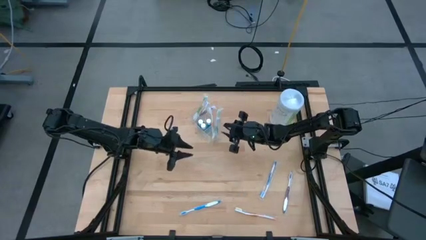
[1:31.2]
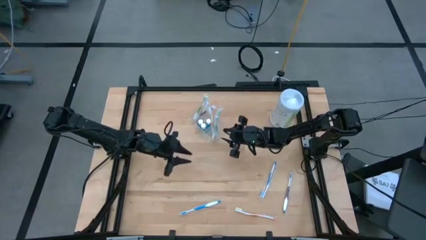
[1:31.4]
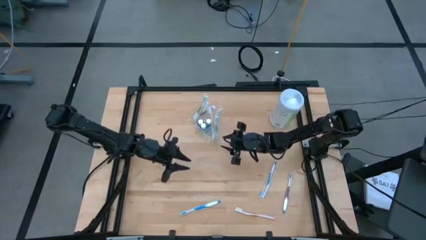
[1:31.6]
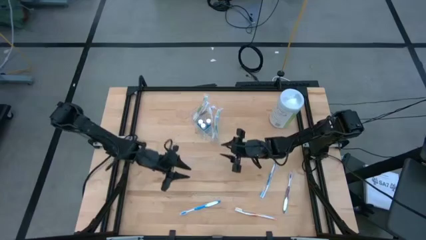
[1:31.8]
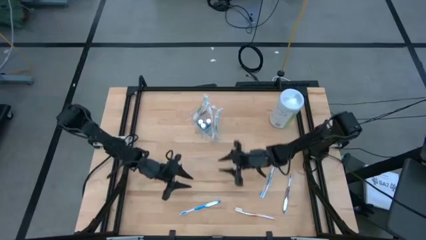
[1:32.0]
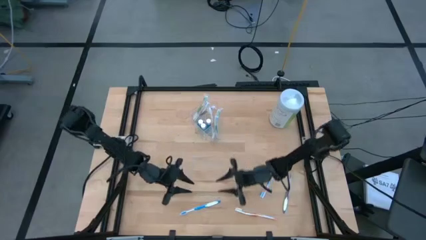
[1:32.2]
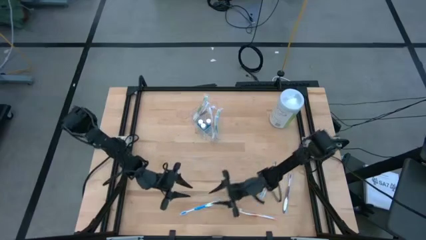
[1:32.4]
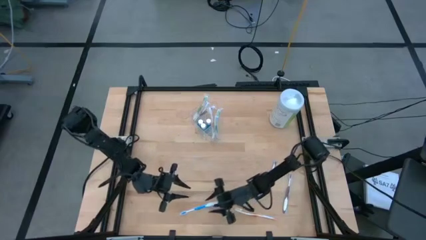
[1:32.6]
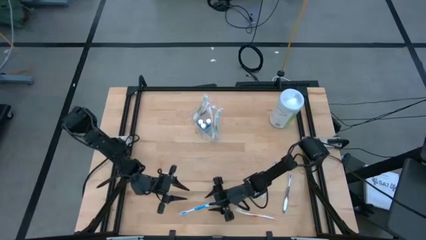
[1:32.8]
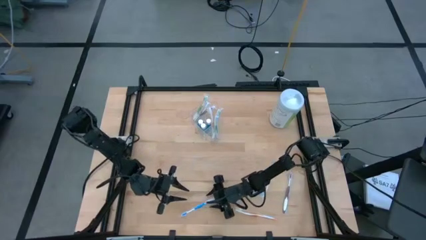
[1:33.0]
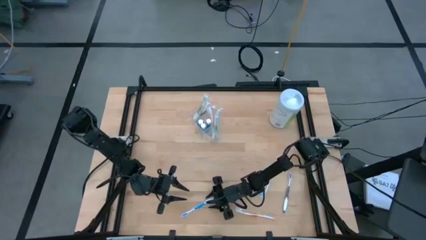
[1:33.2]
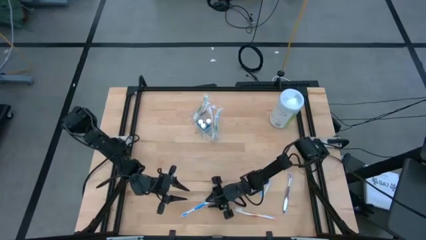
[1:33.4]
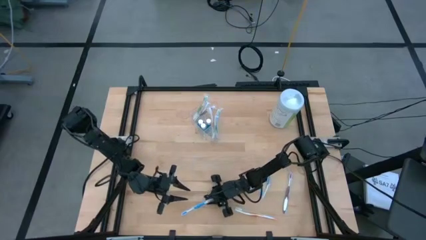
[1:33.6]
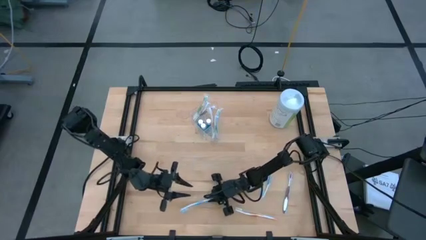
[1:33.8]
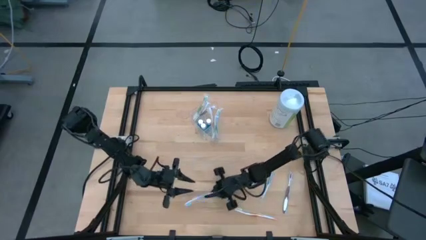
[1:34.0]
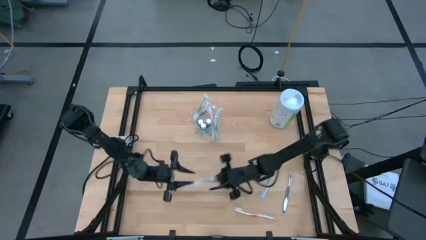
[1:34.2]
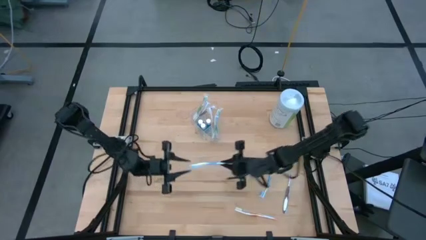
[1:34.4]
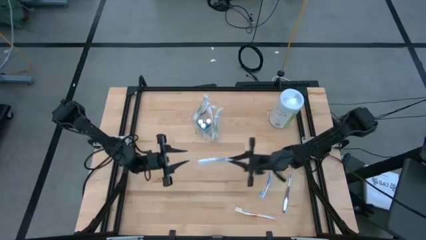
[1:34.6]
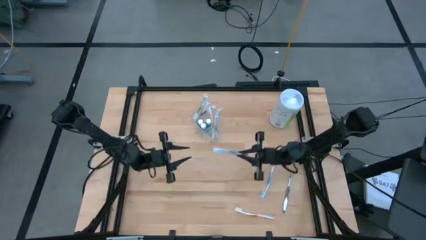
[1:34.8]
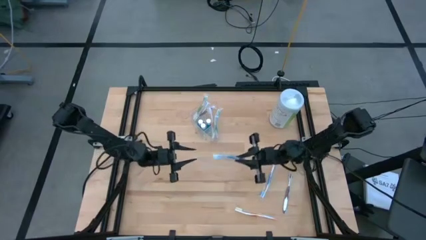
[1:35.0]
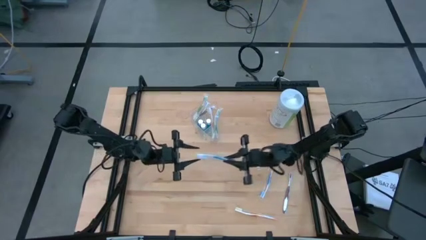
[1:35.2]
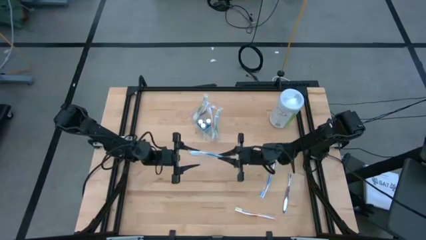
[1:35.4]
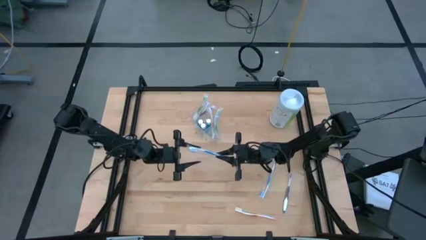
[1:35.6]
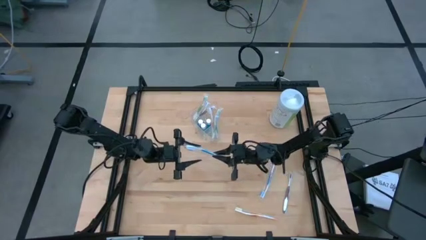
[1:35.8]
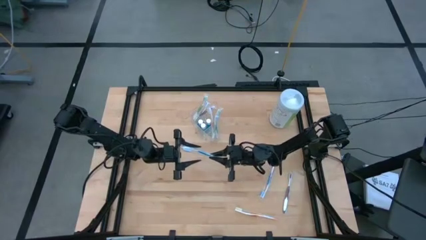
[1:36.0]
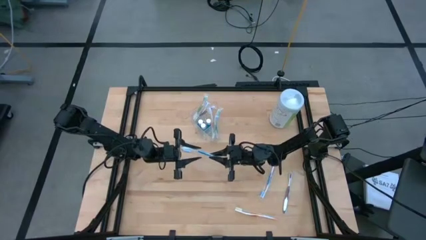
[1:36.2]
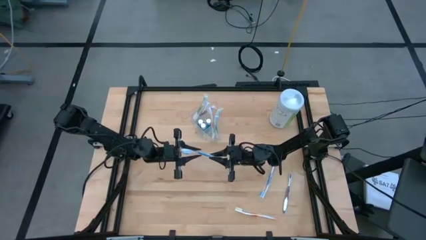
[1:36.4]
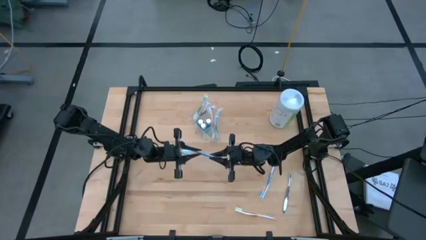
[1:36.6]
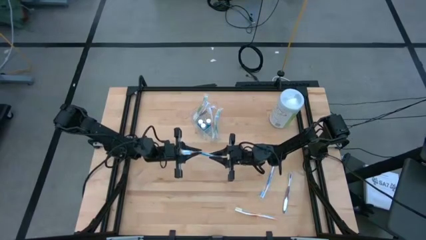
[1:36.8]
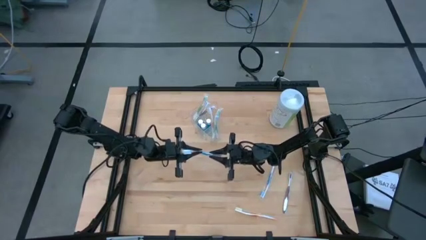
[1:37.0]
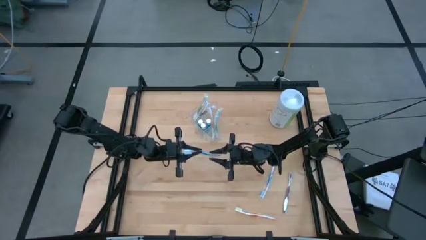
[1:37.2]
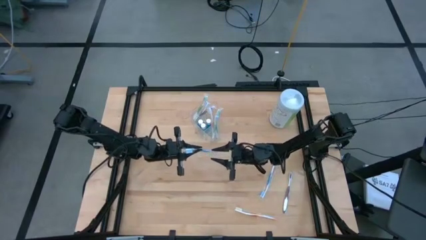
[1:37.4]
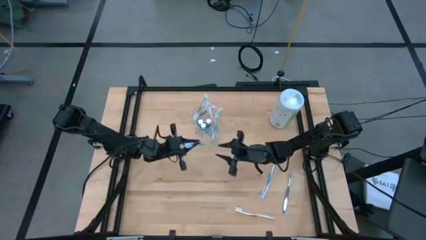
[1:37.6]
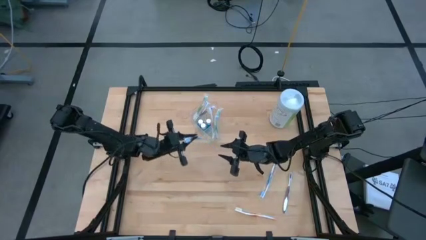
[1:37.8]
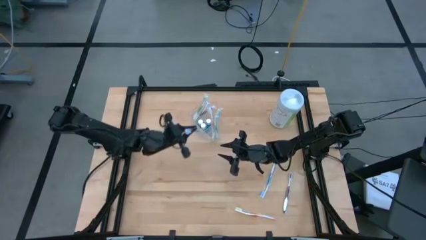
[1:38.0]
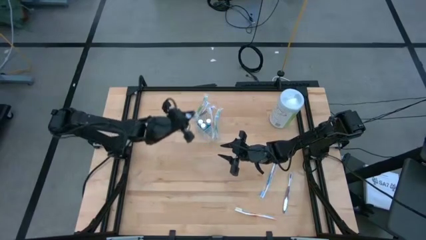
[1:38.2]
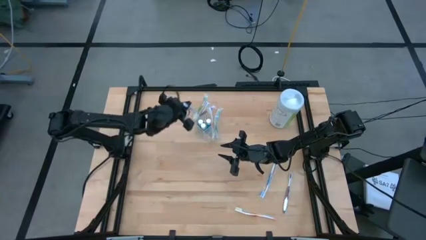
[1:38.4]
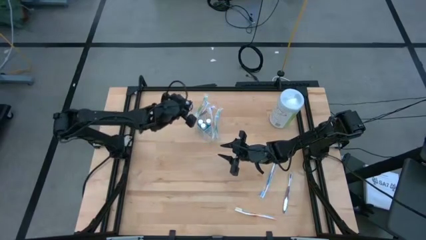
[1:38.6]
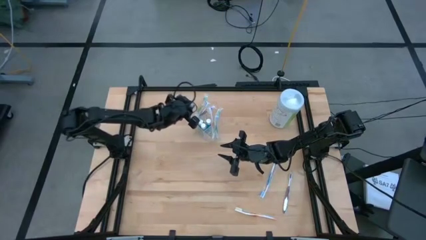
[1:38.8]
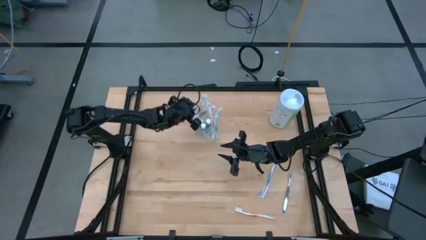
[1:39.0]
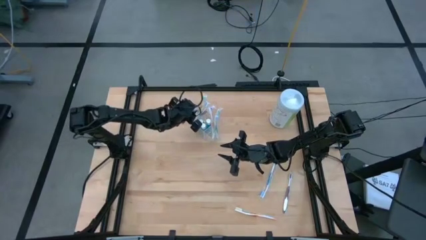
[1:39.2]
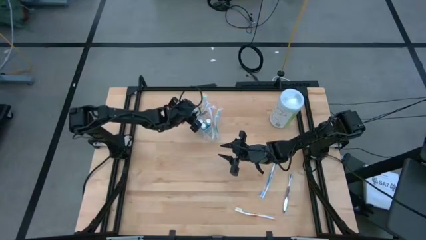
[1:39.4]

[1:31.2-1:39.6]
Task: Pick & Place toothbrushing station
Put the left blue toothbrush into the left section of the organizer

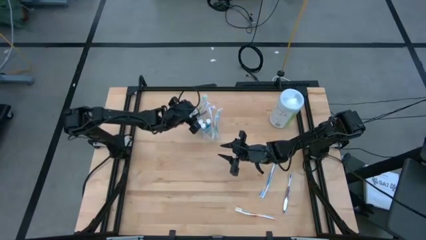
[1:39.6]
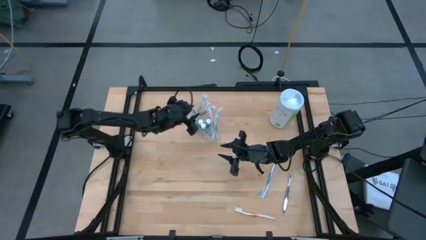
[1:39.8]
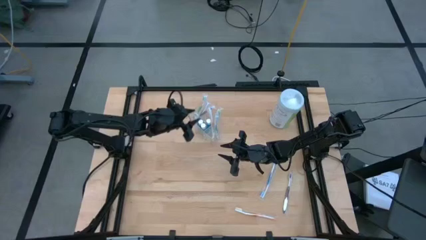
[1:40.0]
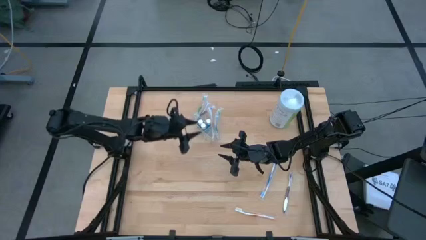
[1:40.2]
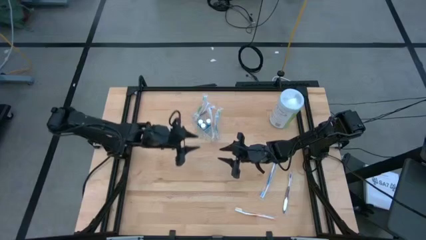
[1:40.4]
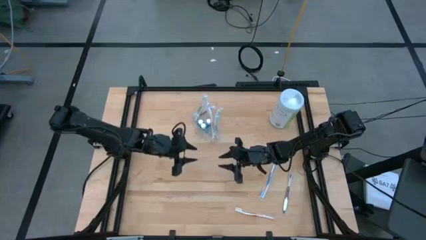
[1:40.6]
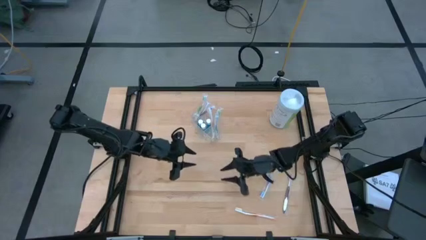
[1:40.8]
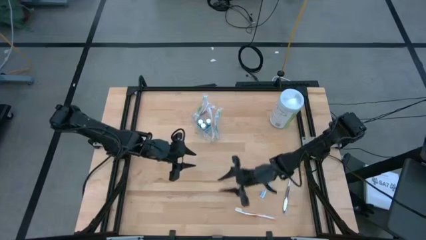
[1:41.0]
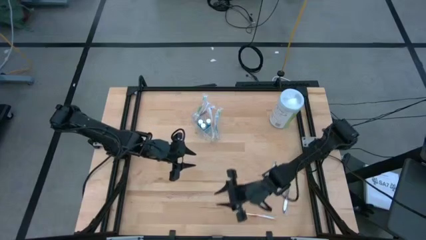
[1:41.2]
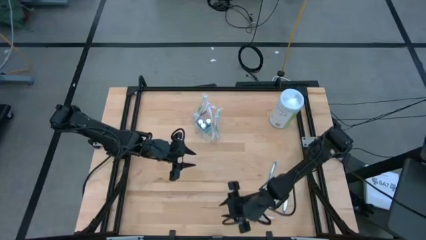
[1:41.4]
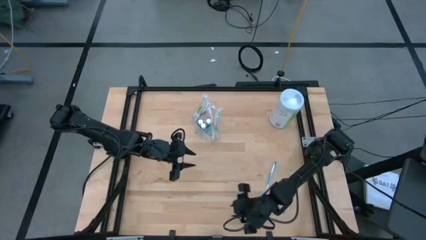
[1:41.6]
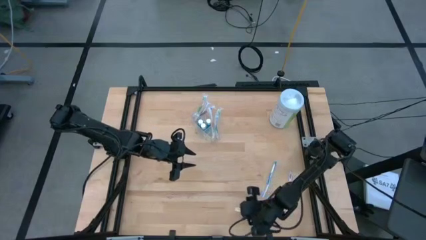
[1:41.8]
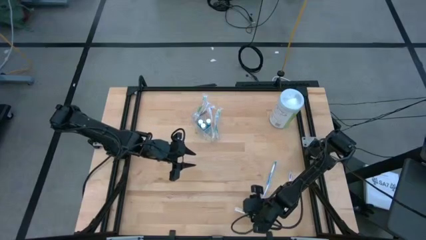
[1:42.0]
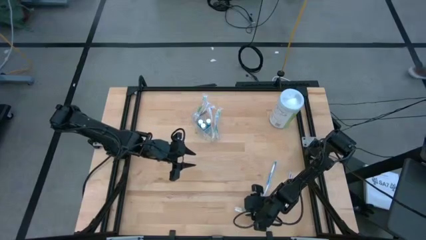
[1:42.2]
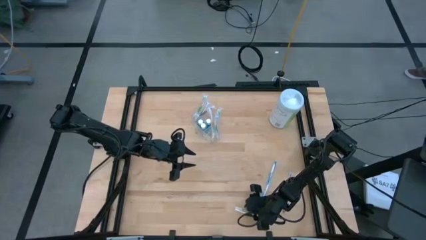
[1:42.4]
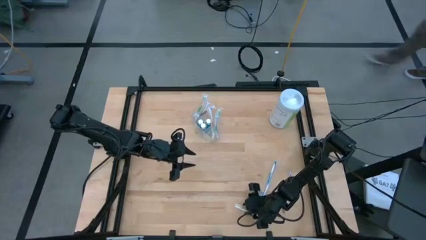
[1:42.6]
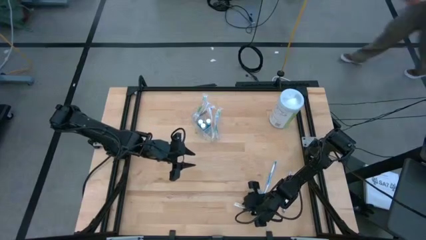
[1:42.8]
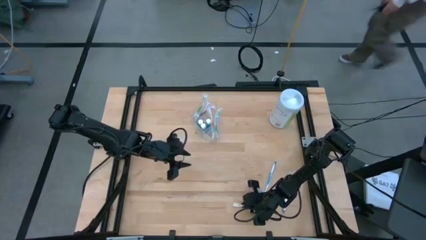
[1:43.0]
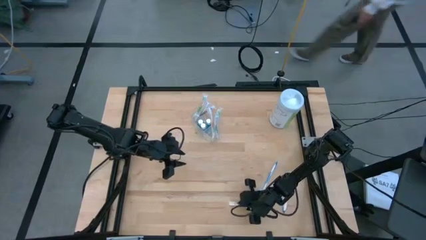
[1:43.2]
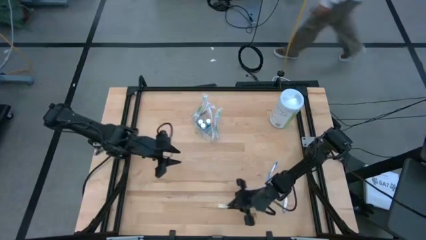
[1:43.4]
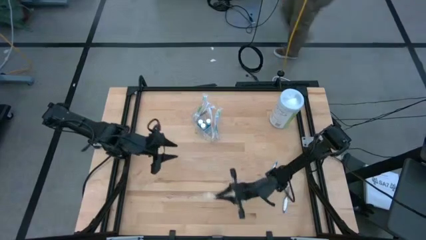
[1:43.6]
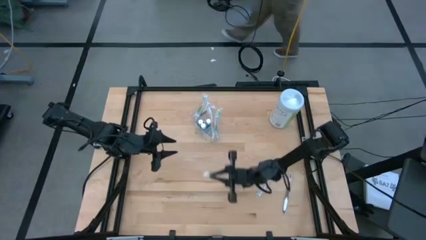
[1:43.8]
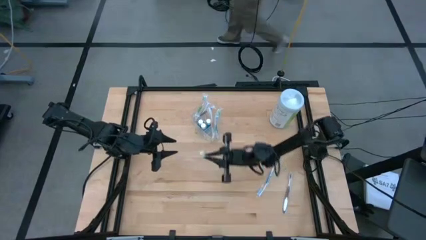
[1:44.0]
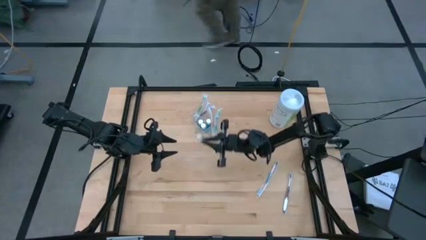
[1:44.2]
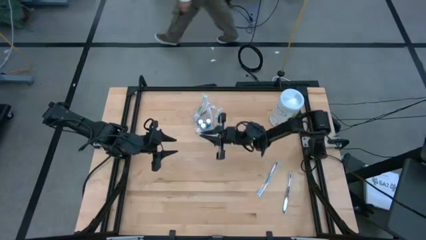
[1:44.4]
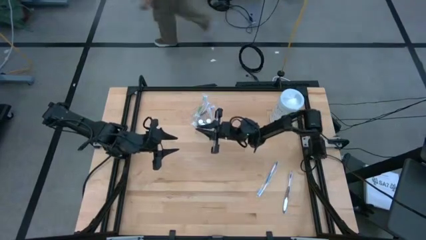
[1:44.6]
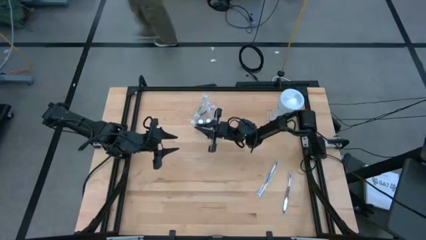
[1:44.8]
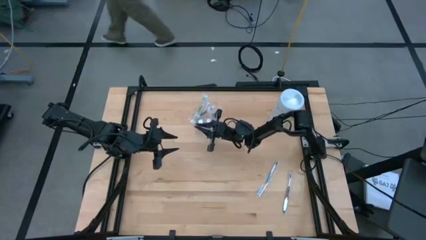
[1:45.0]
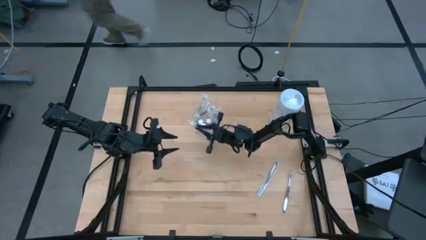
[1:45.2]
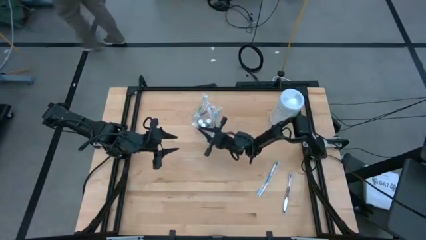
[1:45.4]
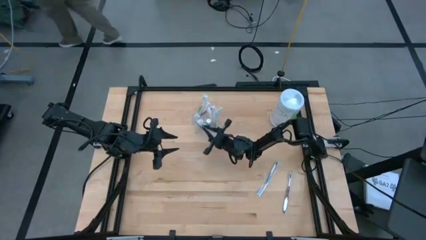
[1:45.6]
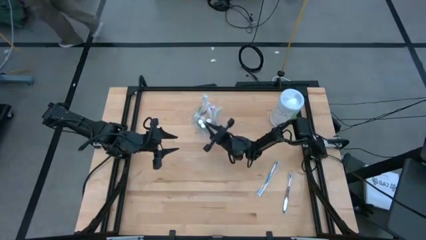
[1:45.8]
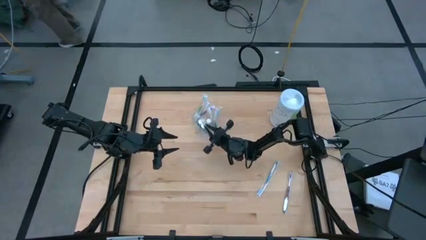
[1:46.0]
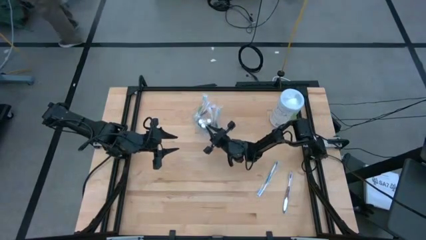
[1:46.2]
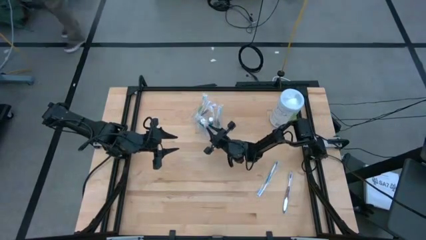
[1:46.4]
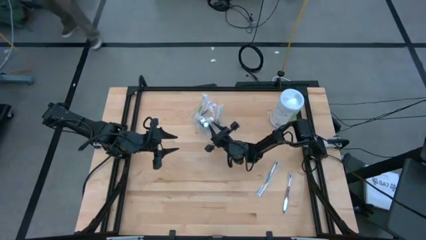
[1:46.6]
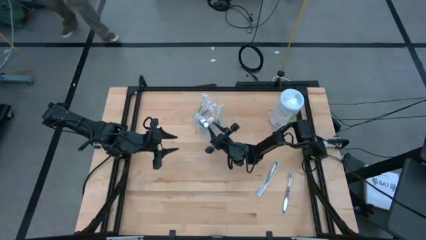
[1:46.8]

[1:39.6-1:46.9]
Put the orange toothbrush into the right section of the organizer
